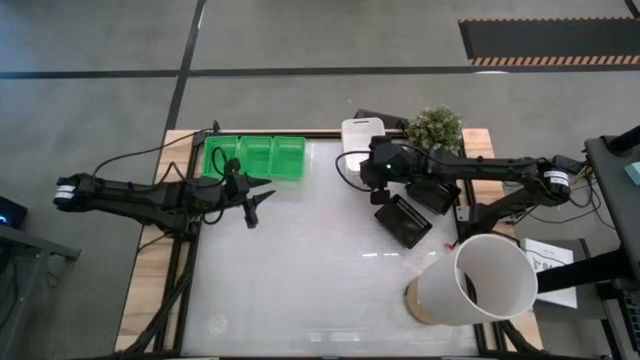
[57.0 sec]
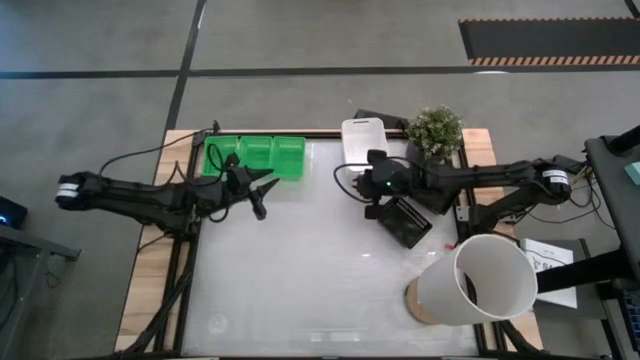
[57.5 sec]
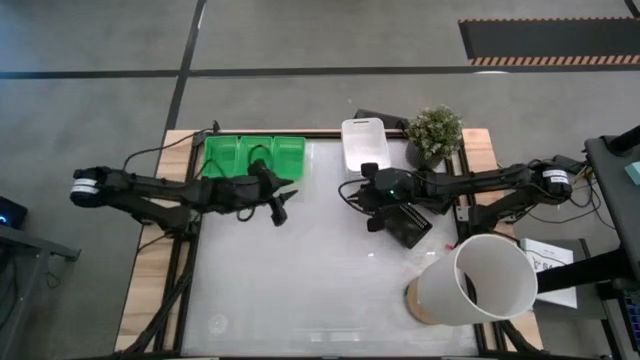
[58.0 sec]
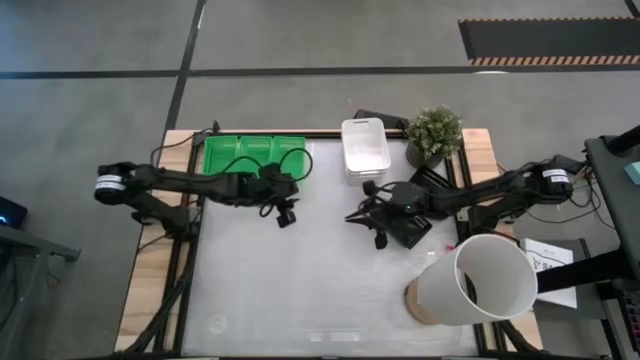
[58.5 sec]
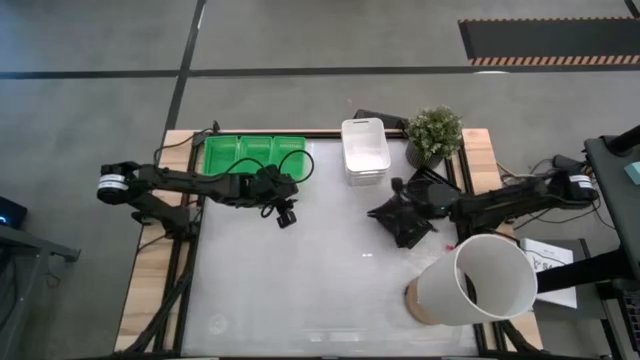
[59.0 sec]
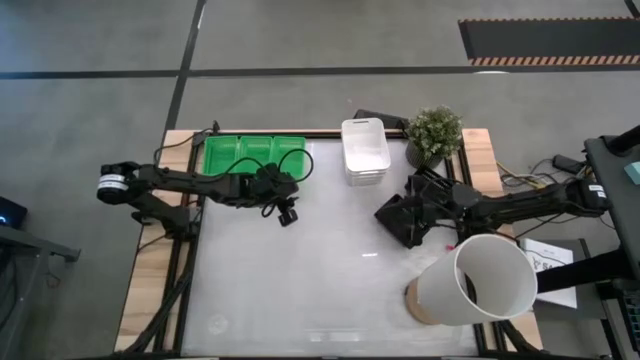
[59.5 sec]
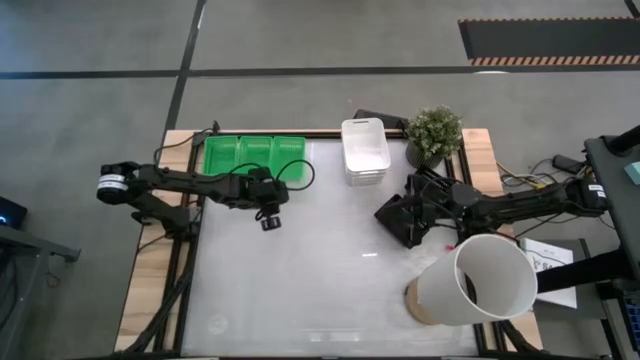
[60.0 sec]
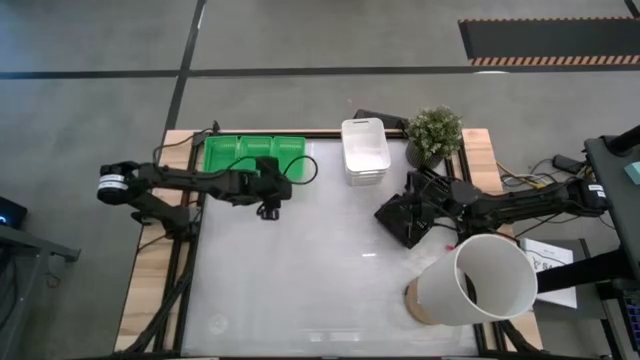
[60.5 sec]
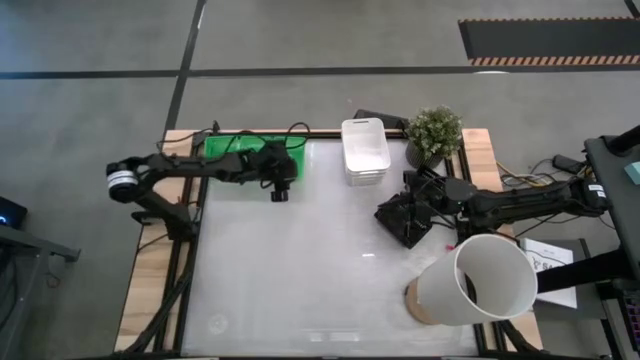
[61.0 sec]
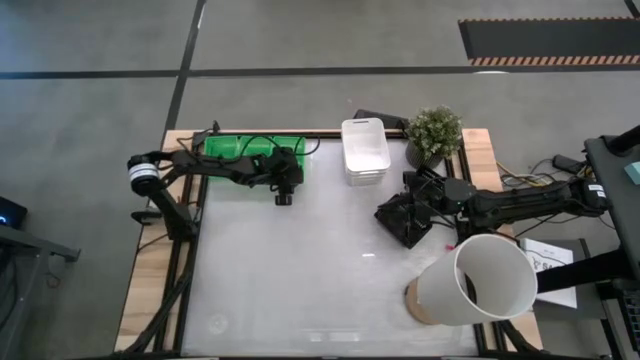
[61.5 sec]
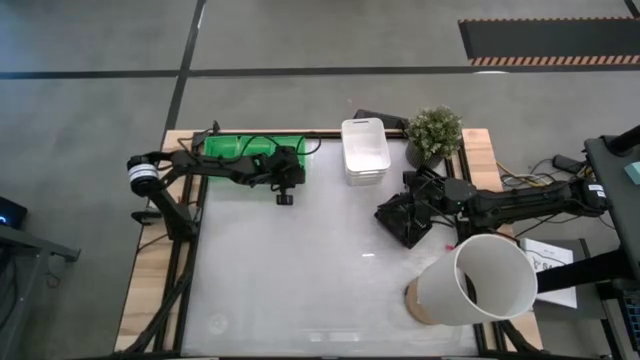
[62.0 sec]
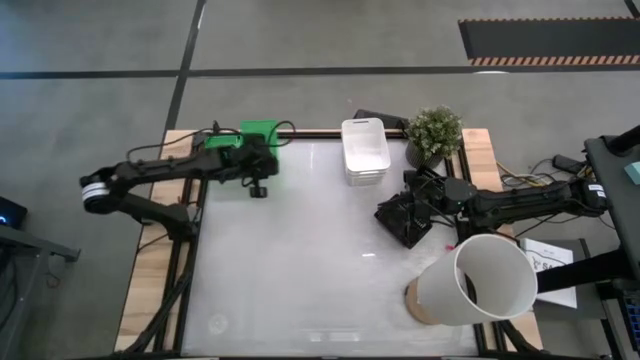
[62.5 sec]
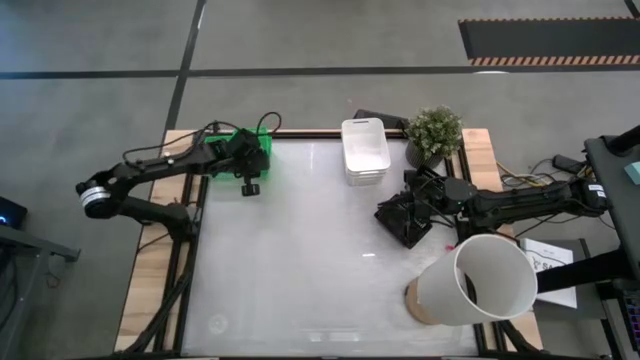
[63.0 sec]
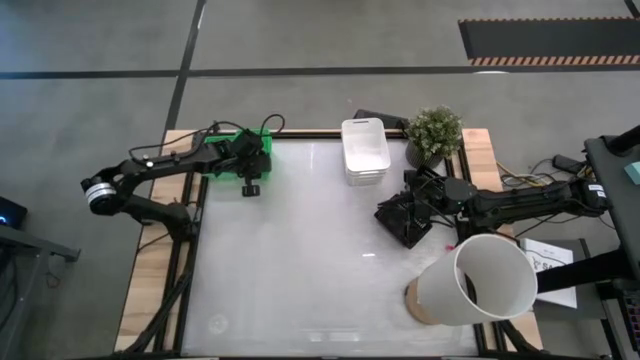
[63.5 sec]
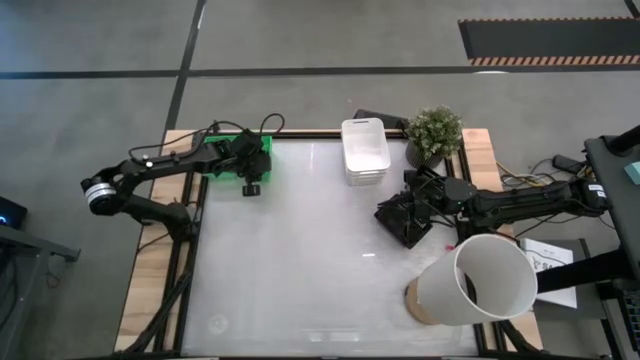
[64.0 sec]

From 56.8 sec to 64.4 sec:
Stack the right green bin on top of the left green bin

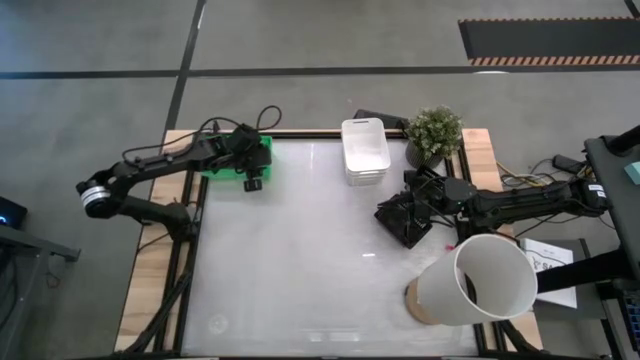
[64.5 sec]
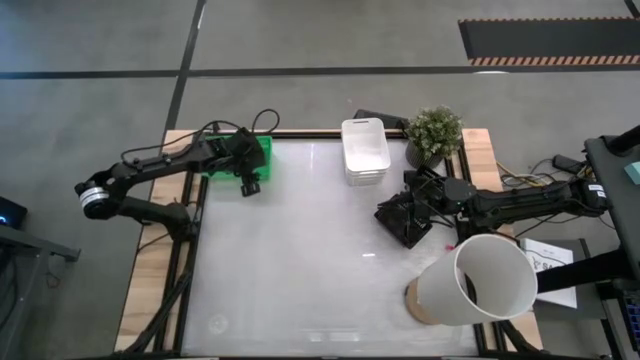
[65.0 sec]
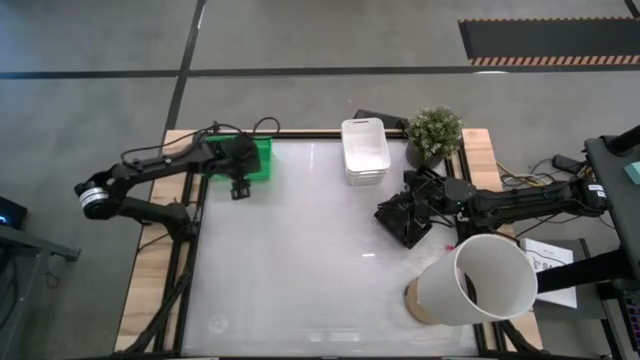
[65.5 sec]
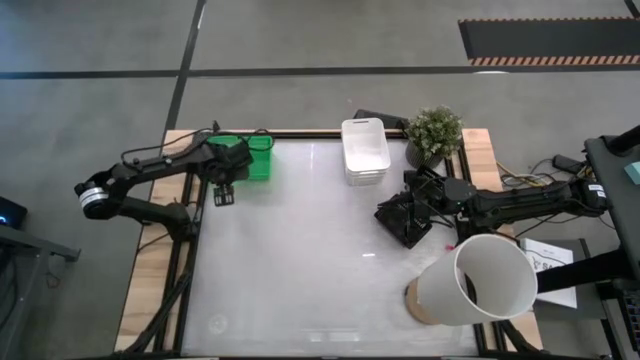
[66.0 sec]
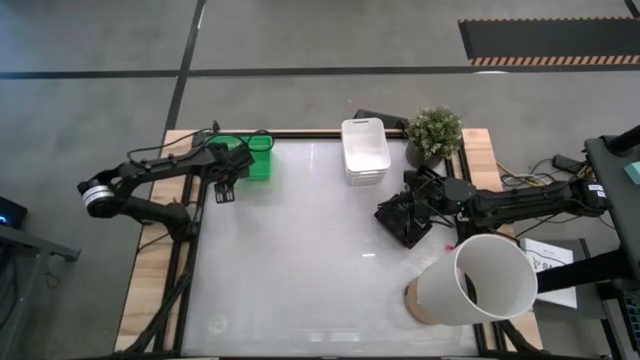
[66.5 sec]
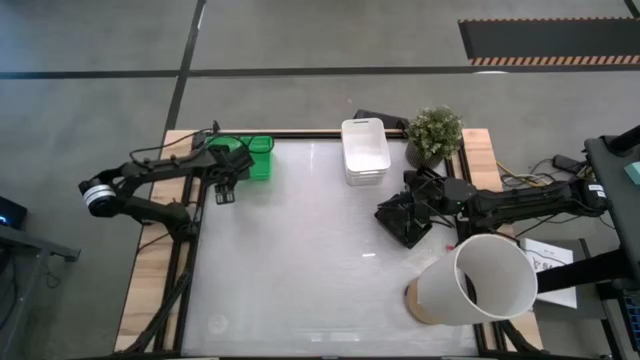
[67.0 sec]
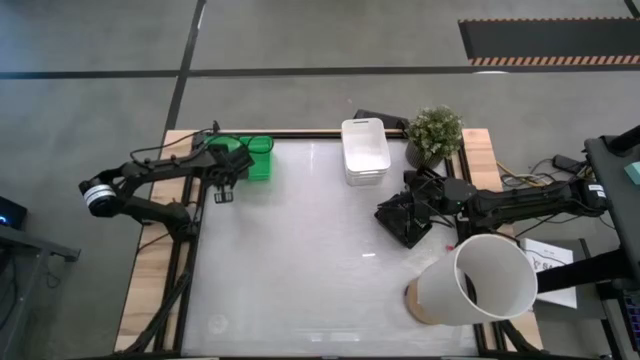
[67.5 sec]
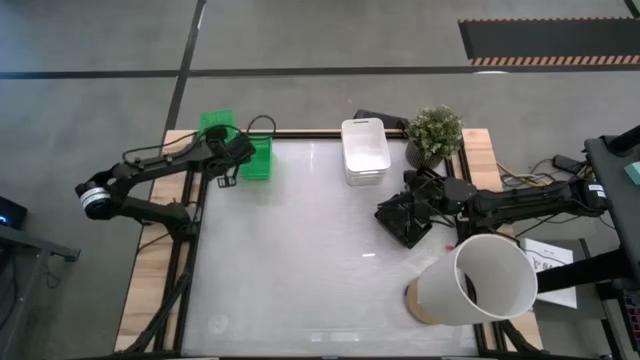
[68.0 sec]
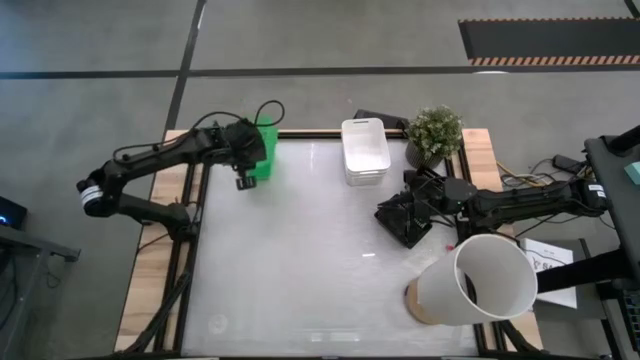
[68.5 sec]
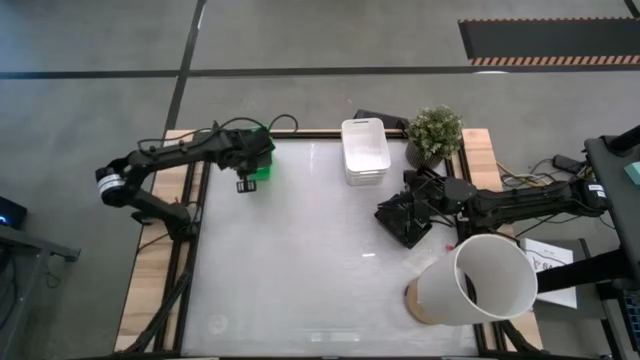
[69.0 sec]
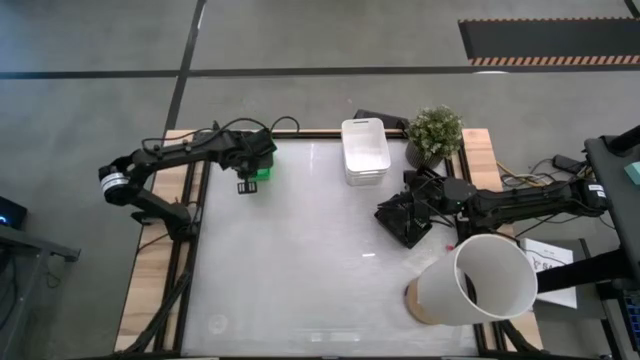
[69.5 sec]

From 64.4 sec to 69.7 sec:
Stack the left green bin on top of the right green bin

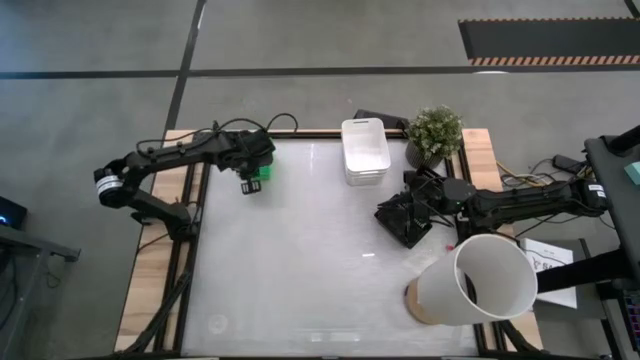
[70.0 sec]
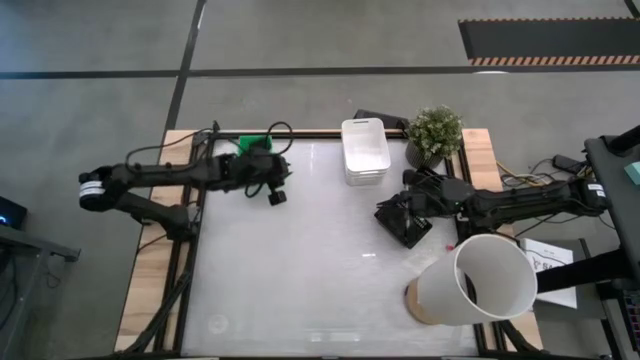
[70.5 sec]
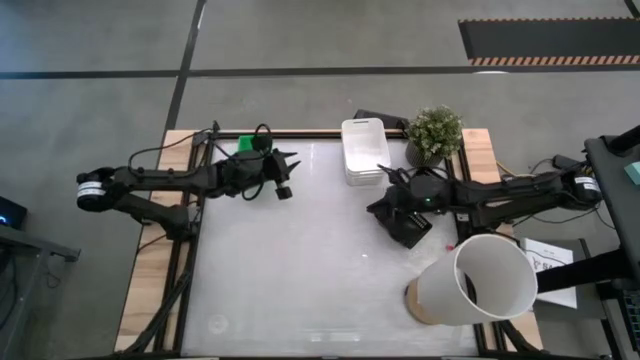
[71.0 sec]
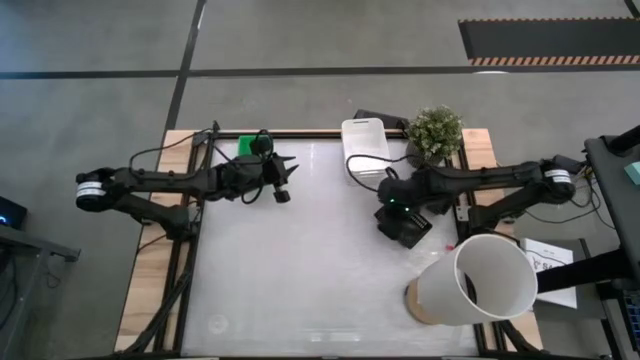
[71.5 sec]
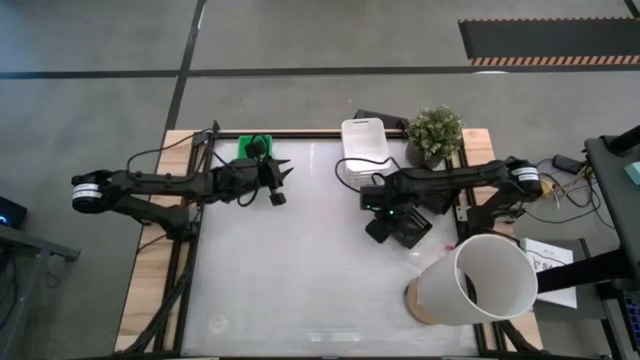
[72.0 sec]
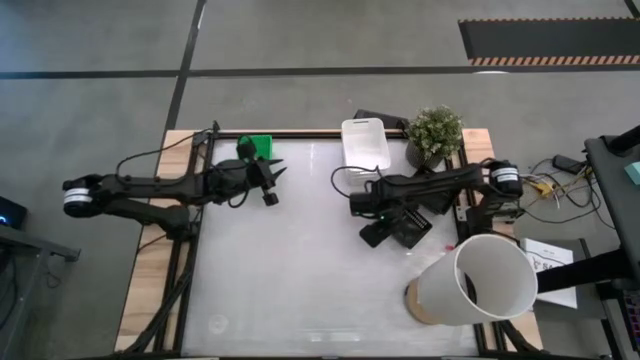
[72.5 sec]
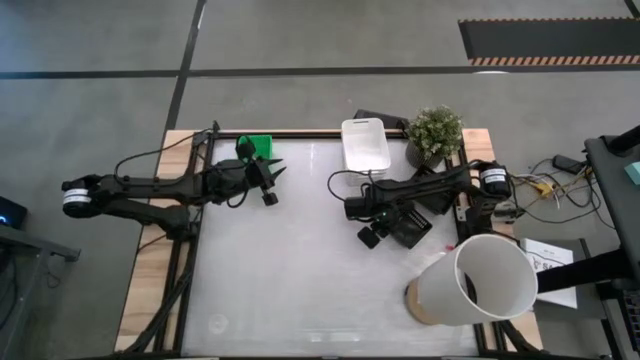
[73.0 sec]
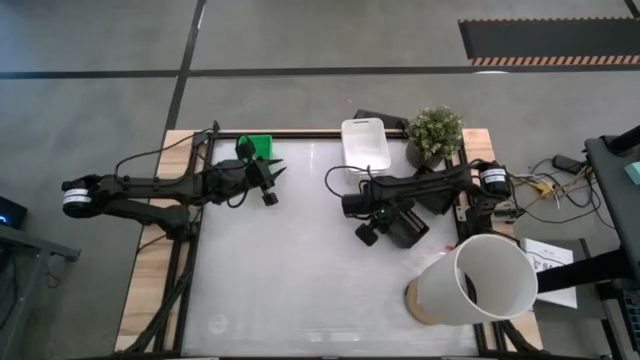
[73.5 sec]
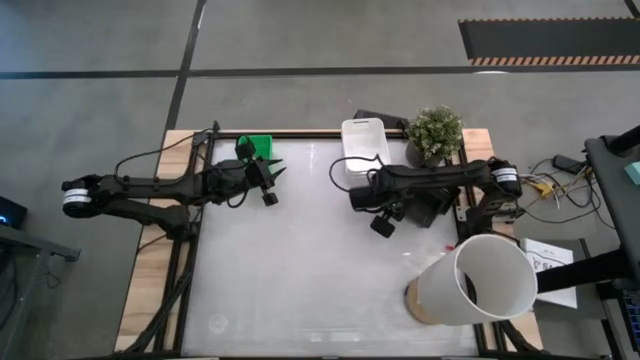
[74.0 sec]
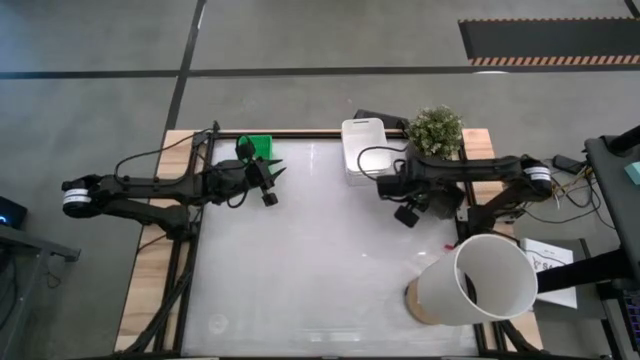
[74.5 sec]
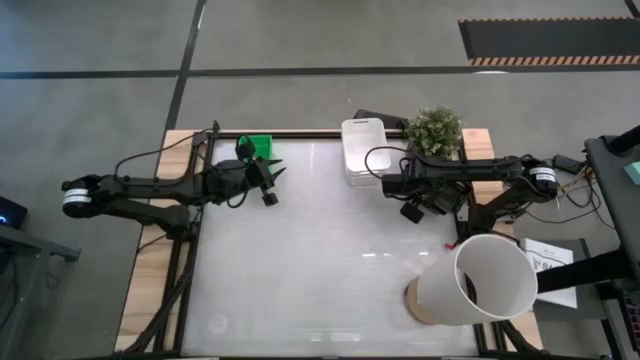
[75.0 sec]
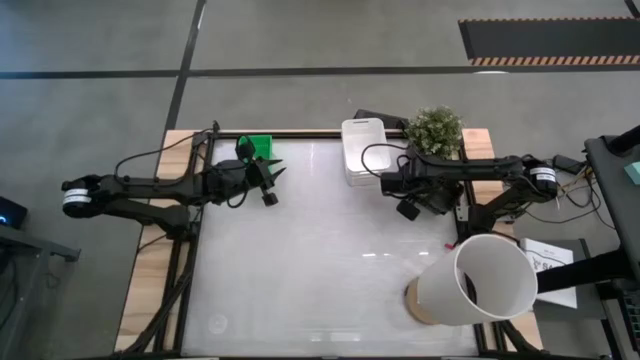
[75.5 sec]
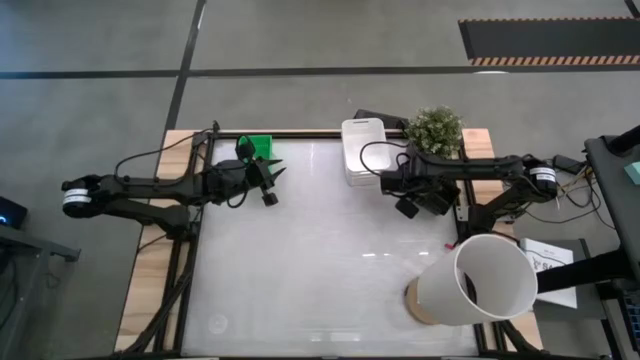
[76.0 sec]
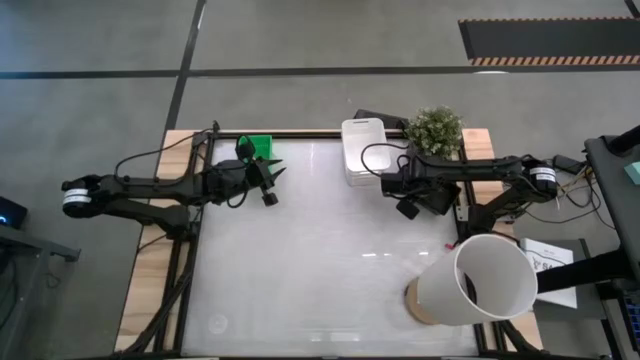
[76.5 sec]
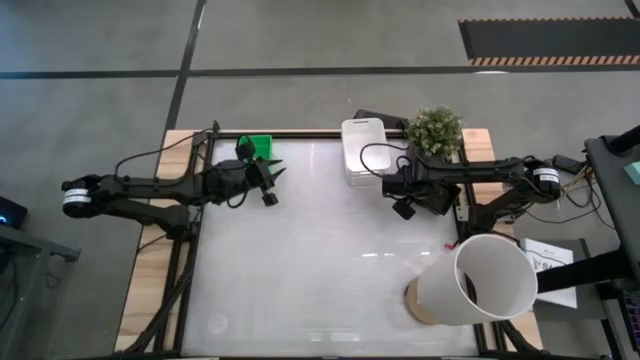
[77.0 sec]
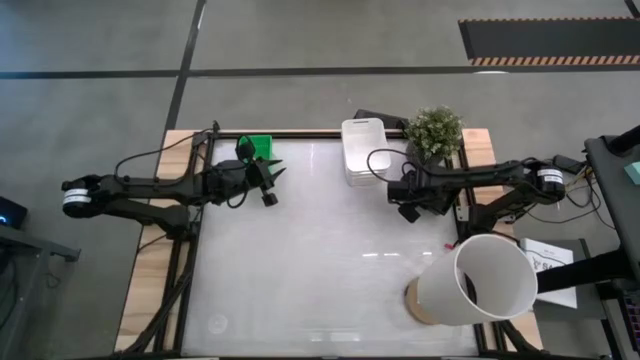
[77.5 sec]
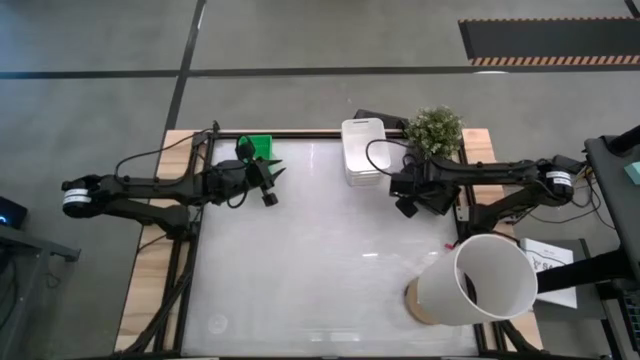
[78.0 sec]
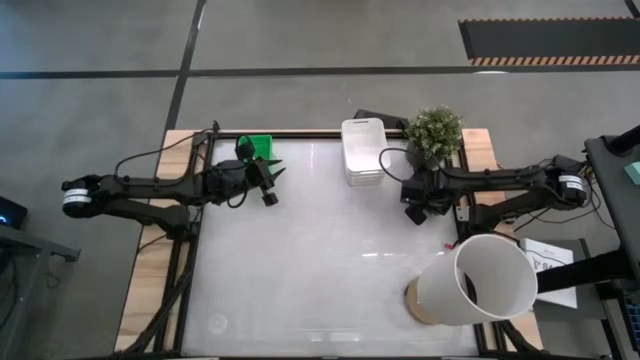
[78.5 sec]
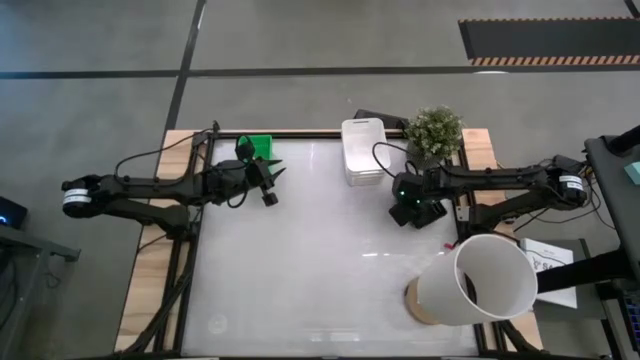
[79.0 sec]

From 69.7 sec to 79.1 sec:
Stack the left black bin on top of the right black bin
